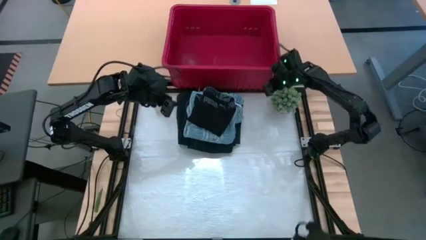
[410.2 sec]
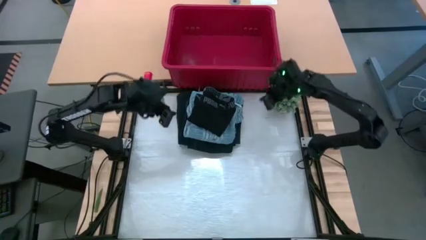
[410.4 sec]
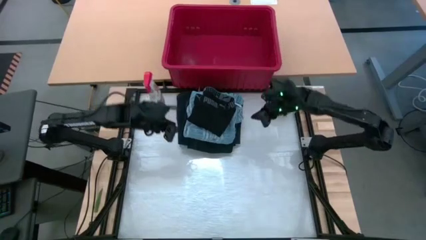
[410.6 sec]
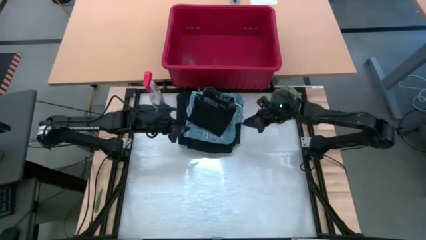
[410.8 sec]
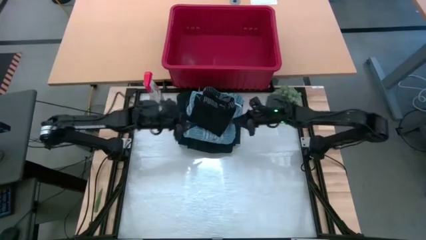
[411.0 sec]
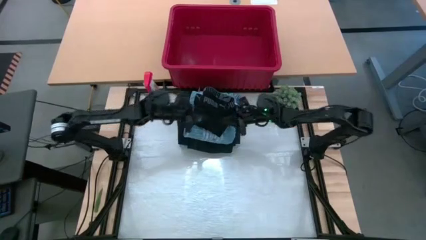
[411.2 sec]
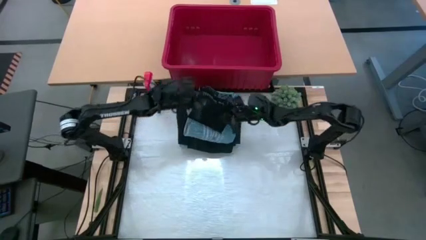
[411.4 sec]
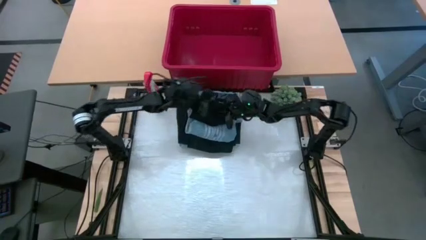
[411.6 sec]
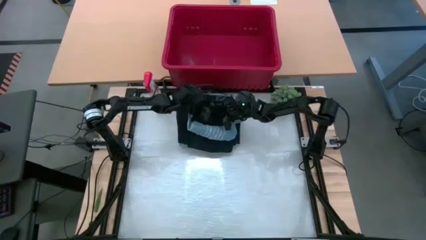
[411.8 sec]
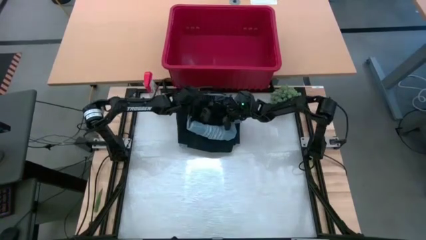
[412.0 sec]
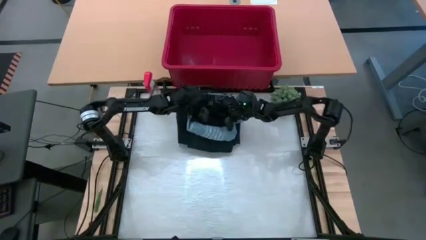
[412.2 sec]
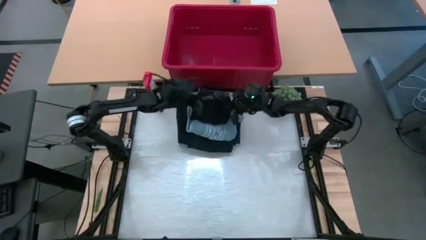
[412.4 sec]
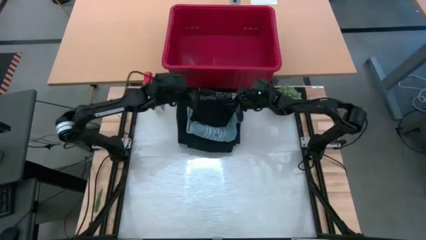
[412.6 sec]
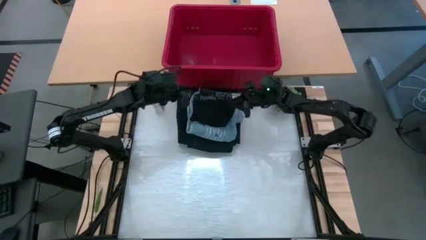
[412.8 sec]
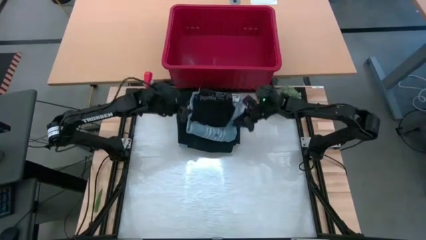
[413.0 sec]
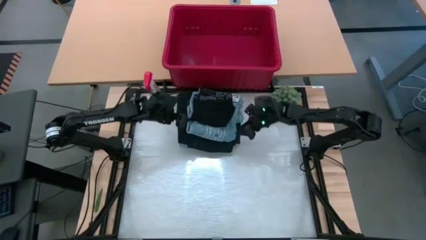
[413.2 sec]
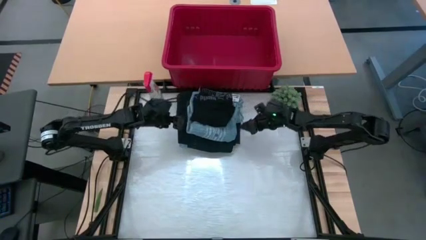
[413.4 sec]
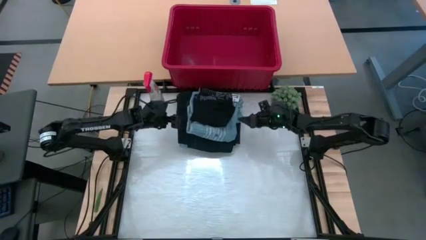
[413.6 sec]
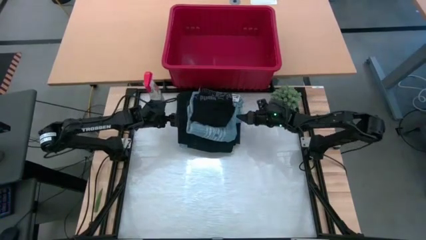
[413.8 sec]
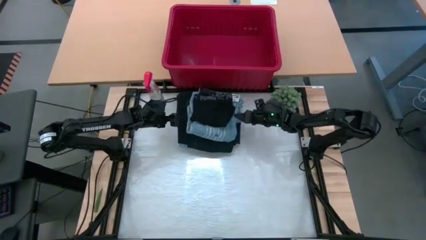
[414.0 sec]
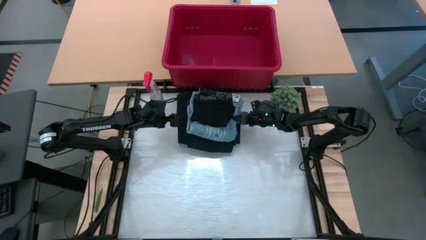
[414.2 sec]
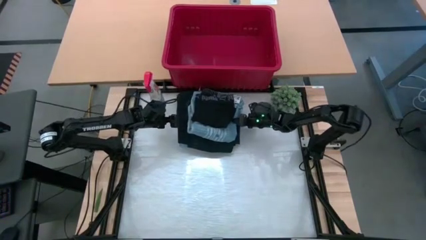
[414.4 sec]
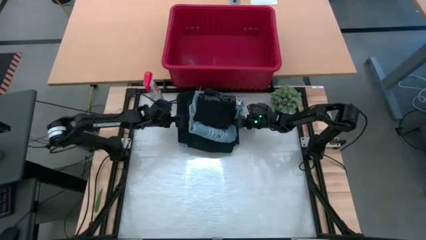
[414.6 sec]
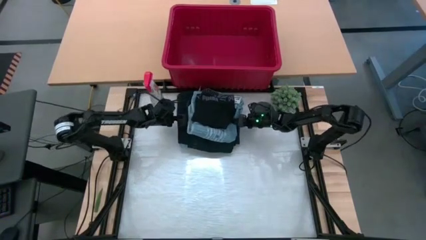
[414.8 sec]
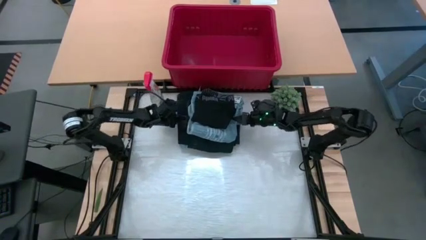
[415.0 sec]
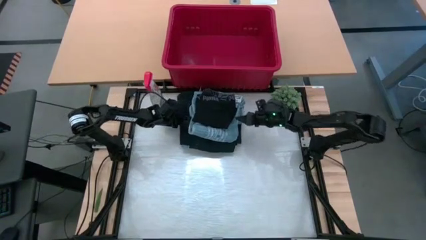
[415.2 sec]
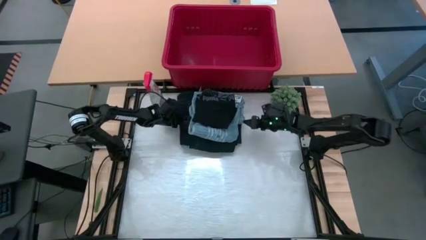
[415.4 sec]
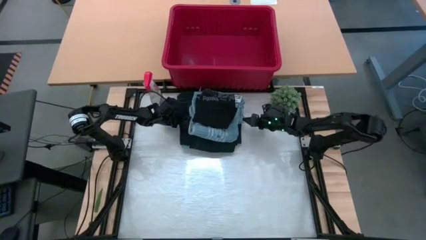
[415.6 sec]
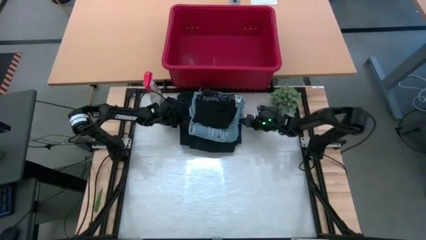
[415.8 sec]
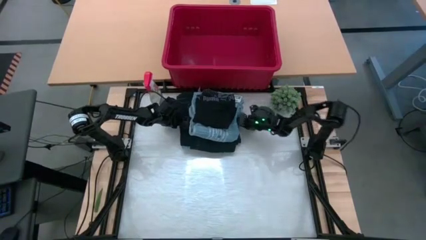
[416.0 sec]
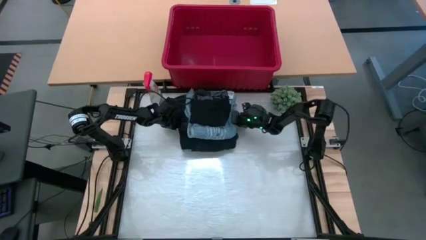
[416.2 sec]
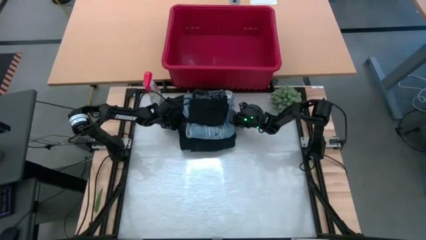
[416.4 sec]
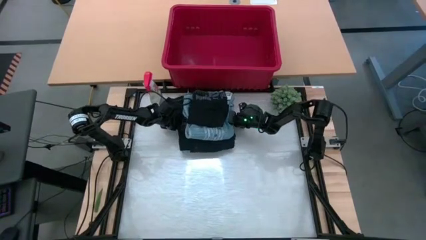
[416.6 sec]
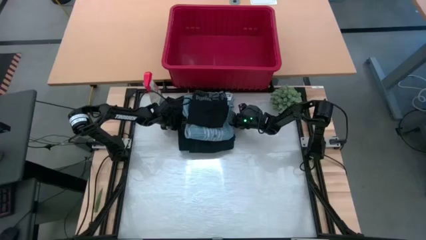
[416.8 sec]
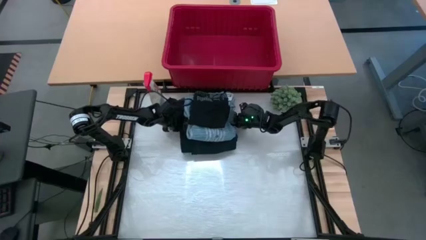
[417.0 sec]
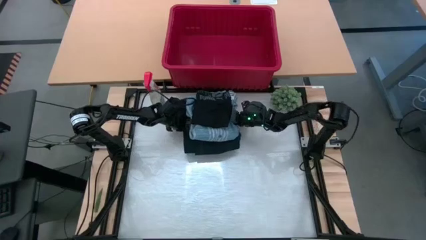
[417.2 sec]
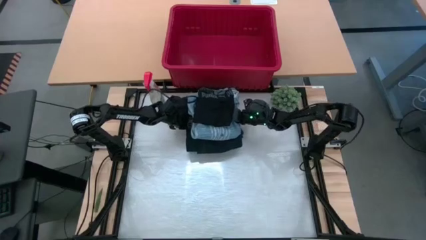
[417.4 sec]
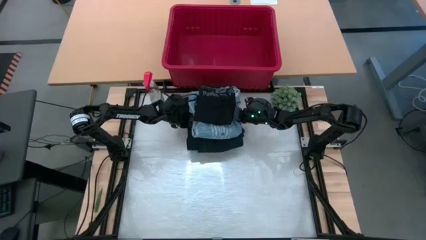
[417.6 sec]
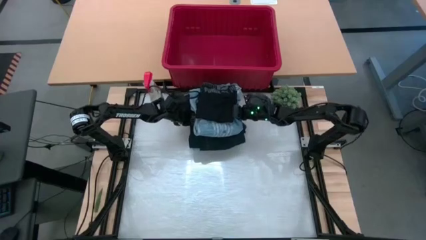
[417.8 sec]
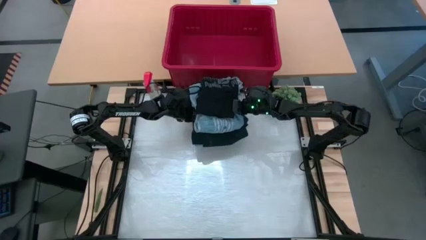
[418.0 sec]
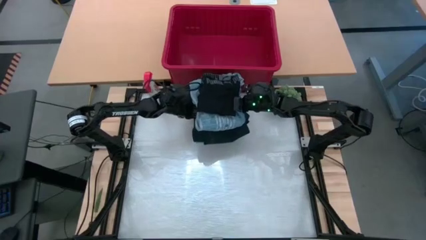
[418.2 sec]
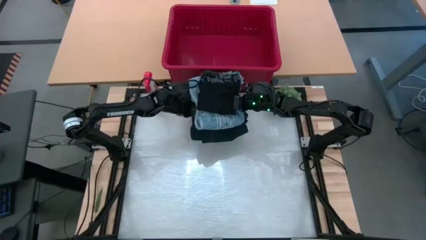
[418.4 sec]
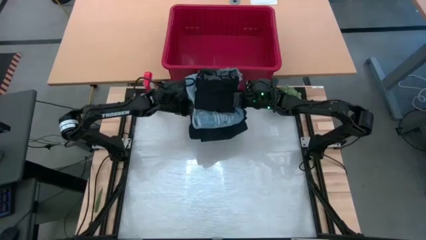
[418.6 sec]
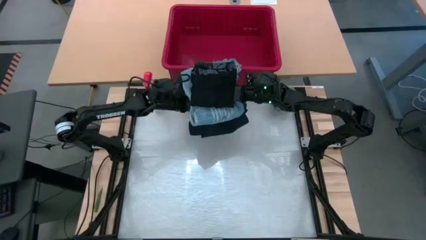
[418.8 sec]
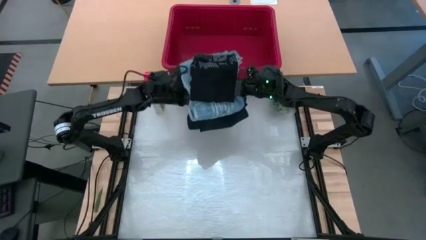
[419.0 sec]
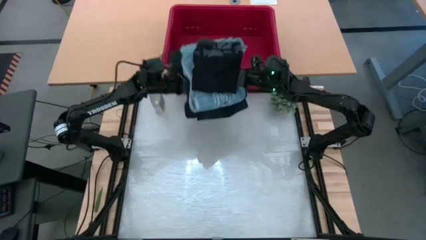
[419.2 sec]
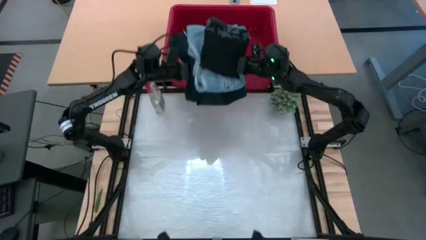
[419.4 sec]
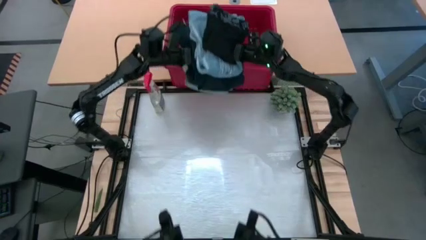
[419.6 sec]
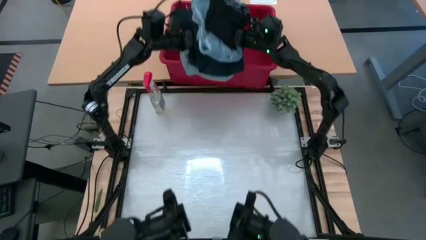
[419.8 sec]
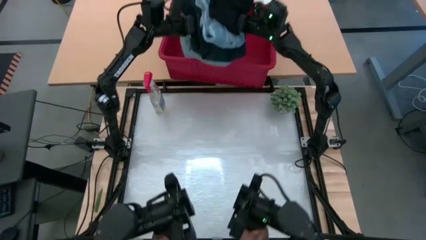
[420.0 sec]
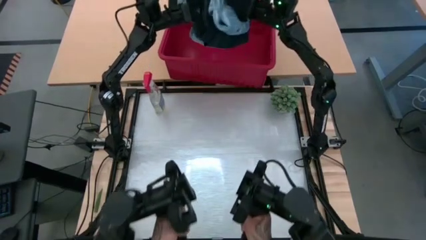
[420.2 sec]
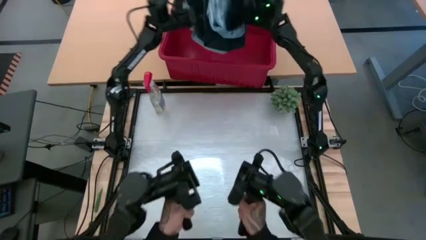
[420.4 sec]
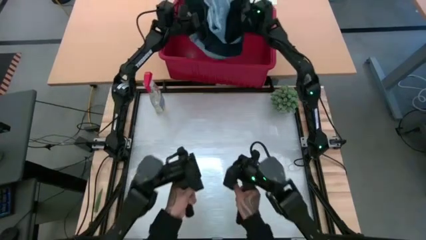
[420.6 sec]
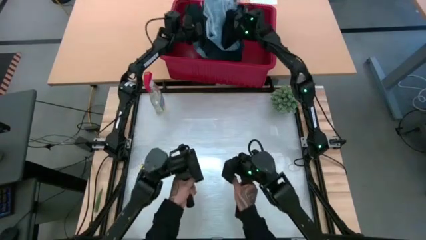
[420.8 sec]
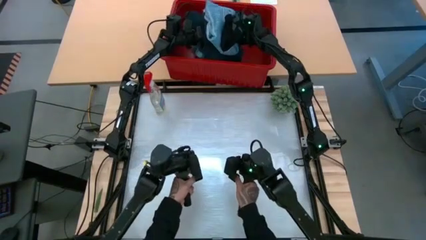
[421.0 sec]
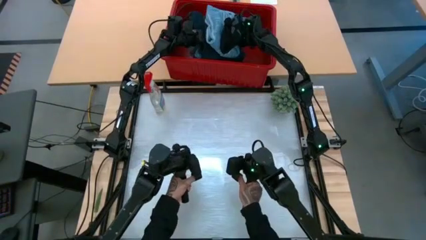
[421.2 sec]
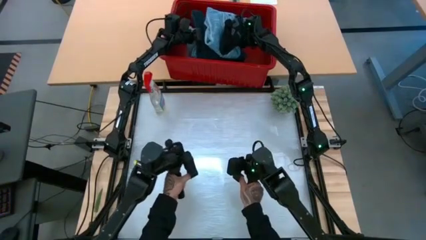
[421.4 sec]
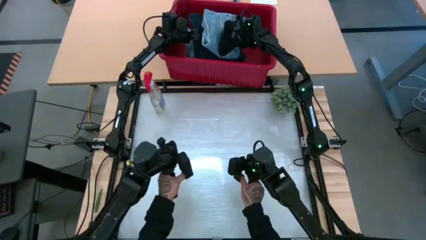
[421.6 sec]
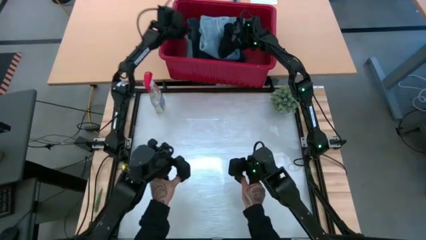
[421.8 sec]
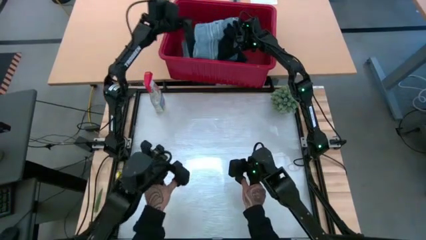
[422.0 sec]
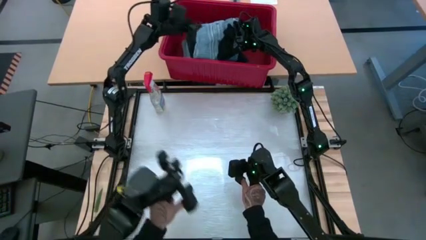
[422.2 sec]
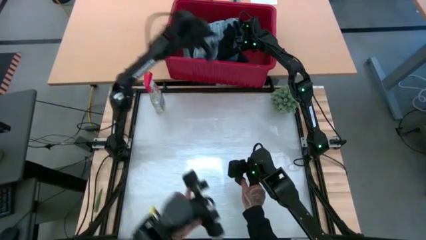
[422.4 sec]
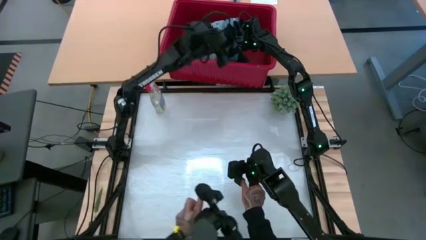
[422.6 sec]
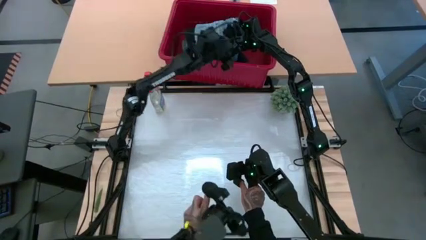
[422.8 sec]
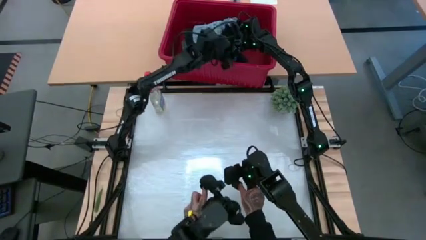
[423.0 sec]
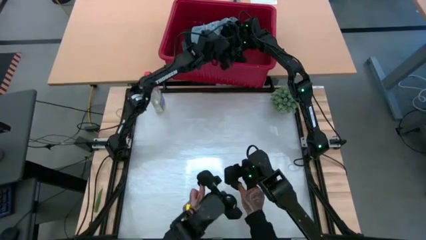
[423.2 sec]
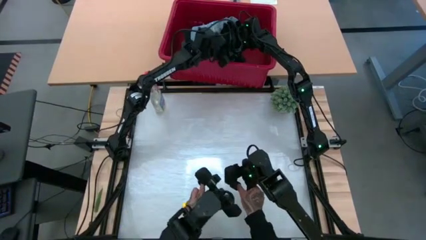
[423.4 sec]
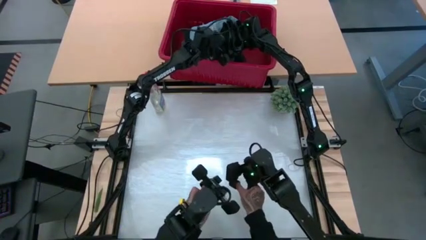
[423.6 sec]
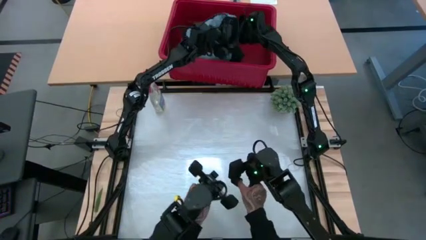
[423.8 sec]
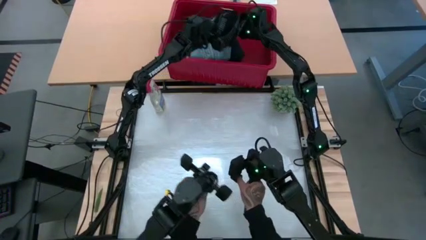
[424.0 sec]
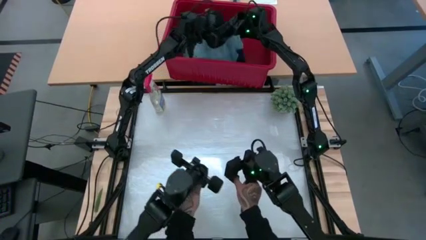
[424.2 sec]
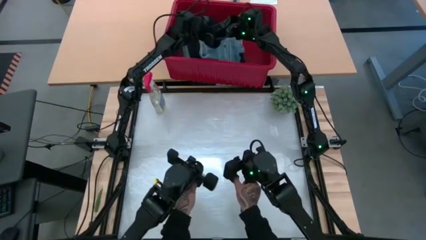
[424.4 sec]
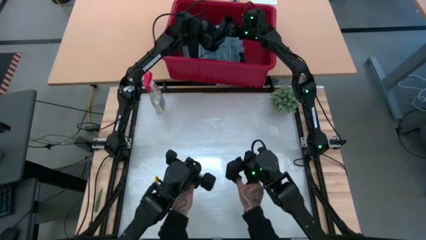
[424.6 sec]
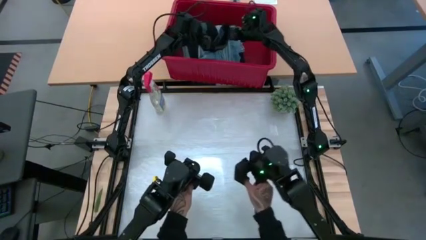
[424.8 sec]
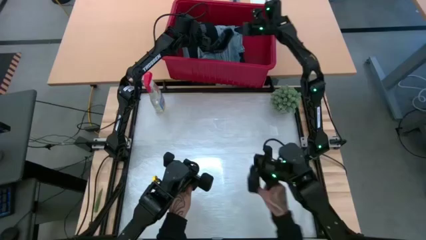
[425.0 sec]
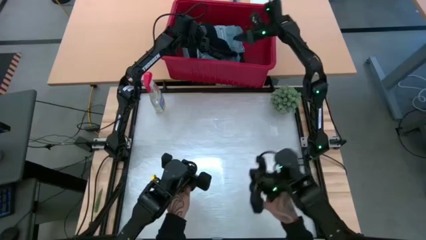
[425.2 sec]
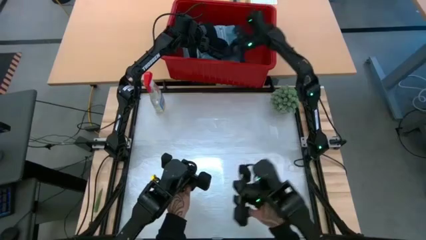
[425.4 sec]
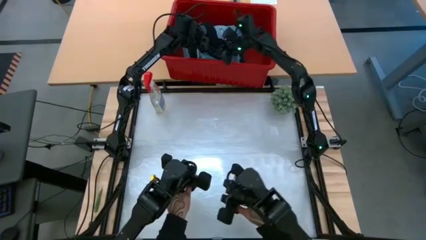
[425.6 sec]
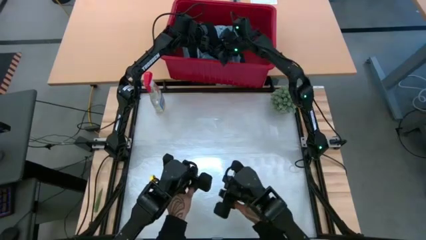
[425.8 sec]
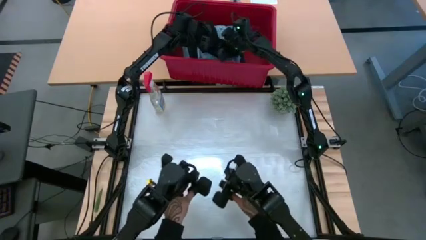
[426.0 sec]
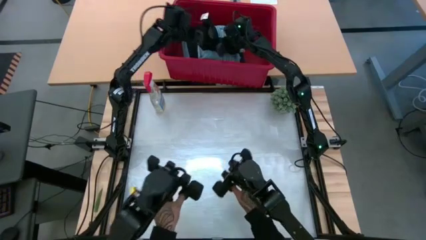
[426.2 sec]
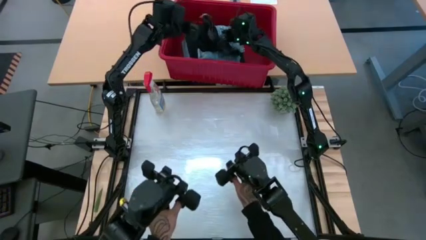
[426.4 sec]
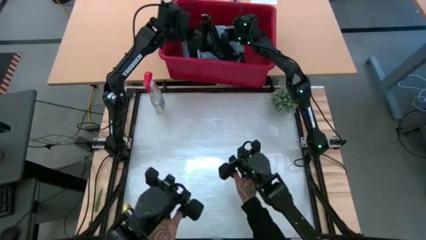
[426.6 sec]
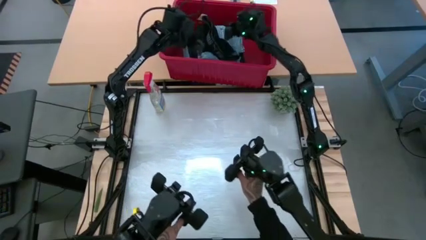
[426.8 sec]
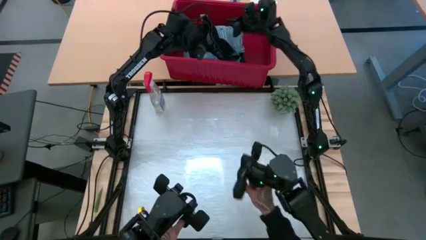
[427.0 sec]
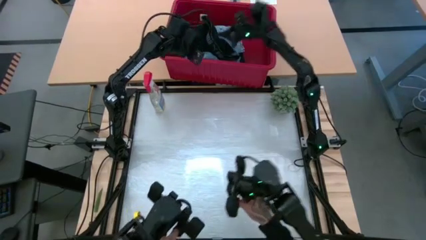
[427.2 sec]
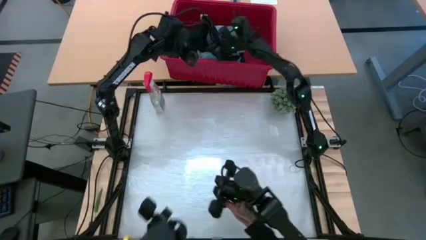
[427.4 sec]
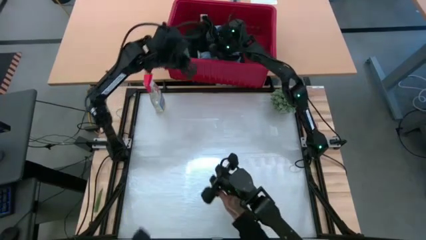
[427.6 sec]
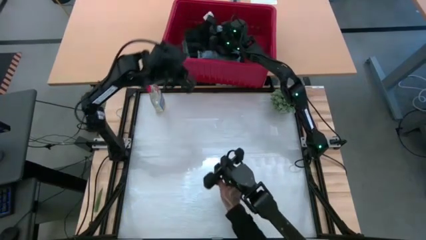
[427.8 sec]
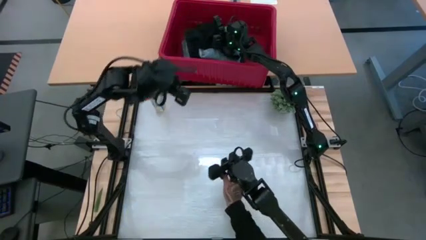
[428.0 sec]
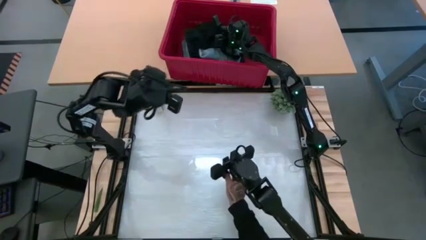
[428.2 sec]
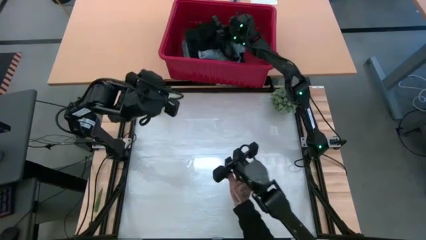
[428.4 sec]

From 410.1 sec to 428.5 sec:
Task: Fold Laundry from Bin
Put all the clothes into the red laundry bin
